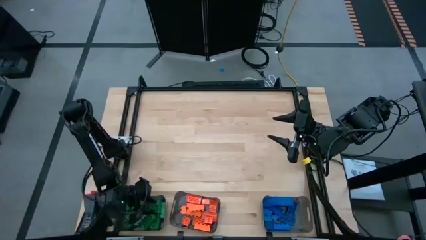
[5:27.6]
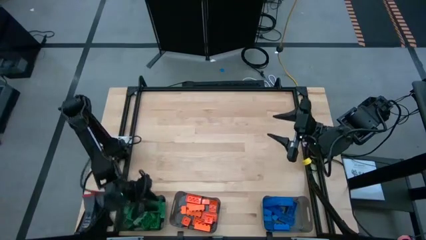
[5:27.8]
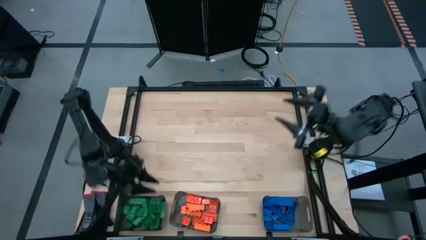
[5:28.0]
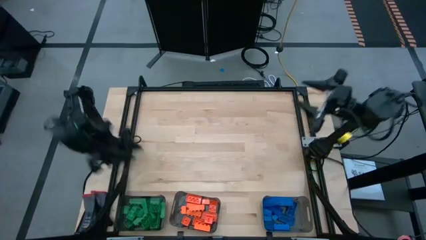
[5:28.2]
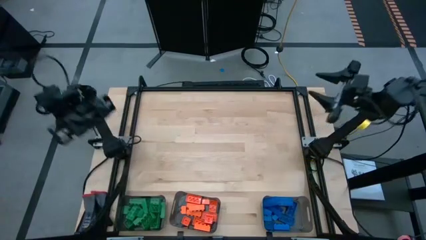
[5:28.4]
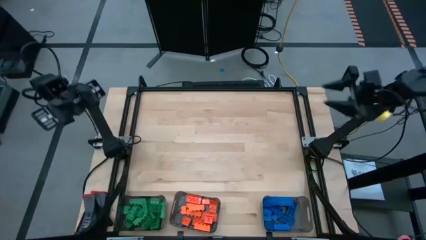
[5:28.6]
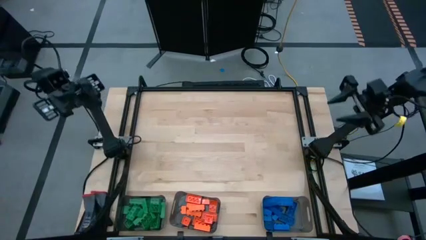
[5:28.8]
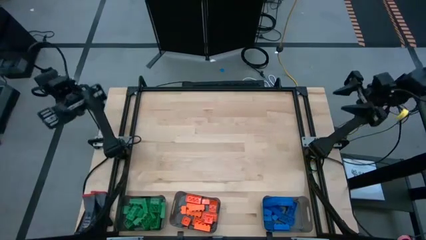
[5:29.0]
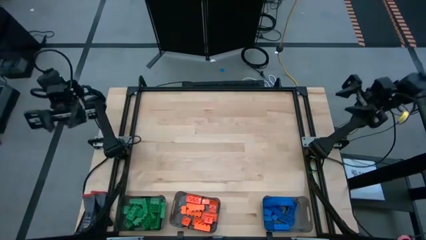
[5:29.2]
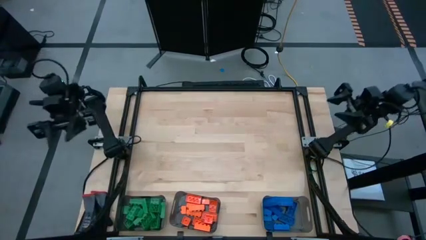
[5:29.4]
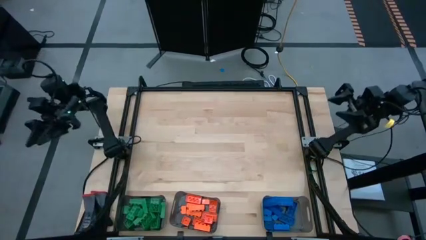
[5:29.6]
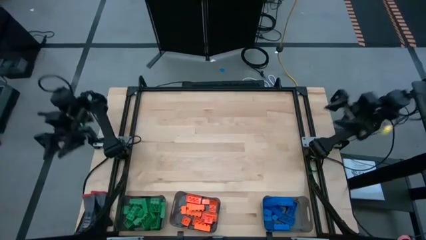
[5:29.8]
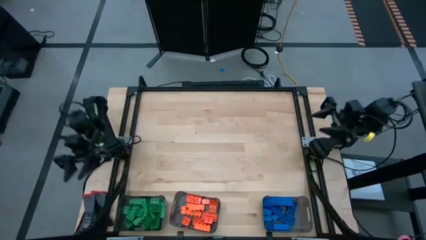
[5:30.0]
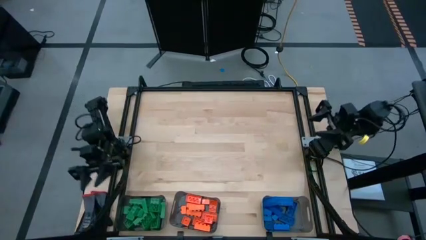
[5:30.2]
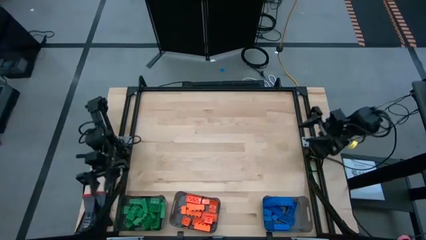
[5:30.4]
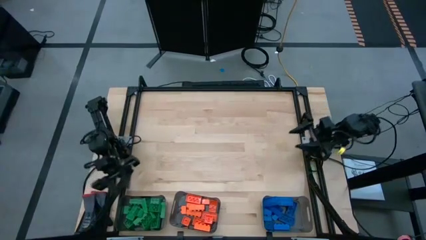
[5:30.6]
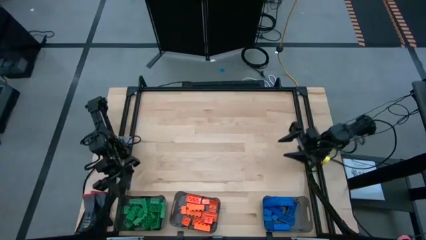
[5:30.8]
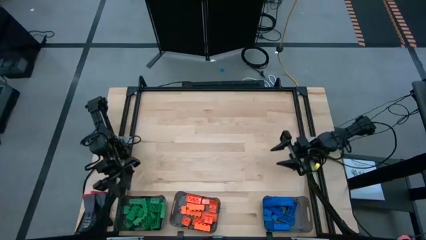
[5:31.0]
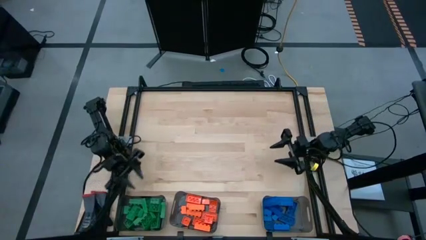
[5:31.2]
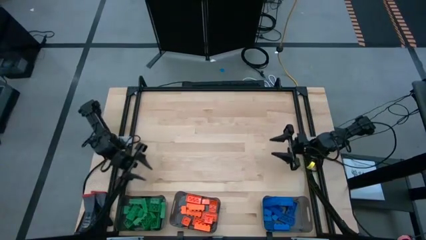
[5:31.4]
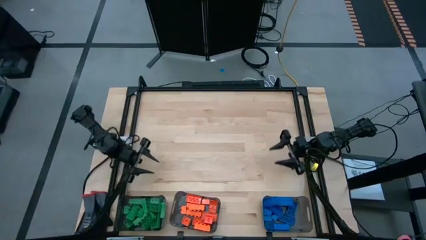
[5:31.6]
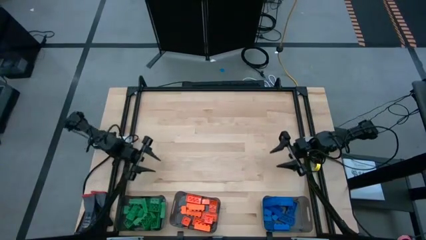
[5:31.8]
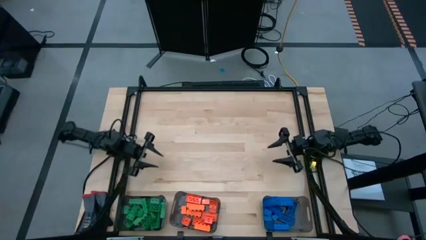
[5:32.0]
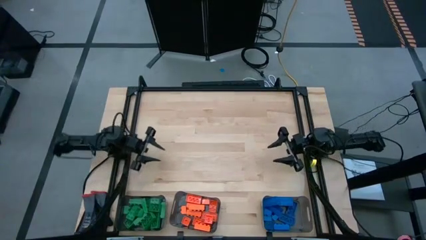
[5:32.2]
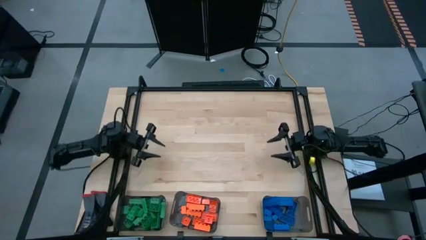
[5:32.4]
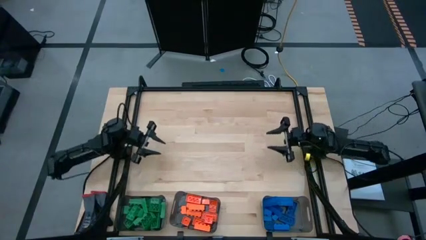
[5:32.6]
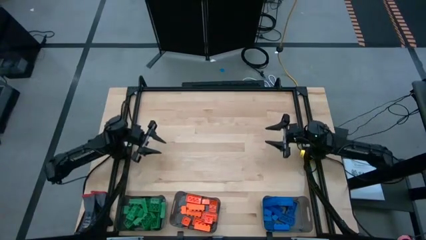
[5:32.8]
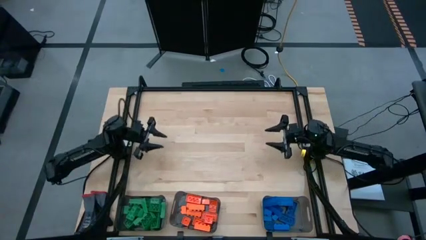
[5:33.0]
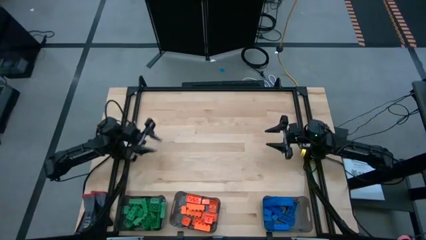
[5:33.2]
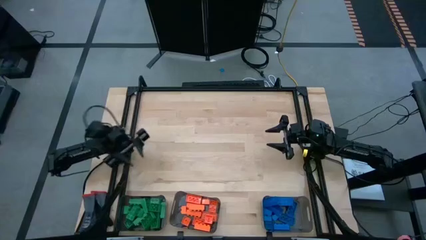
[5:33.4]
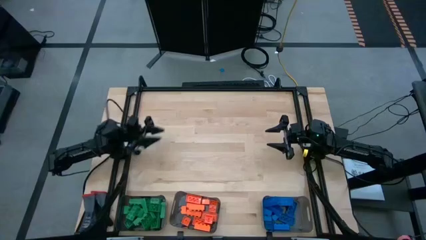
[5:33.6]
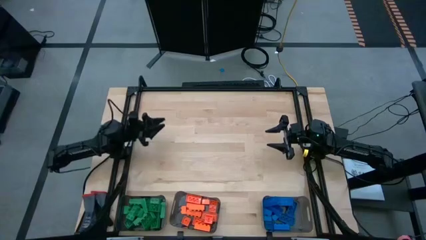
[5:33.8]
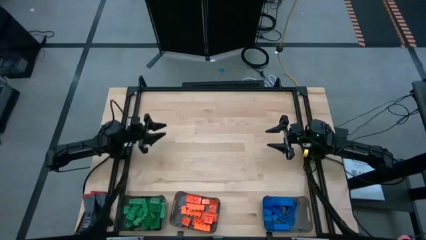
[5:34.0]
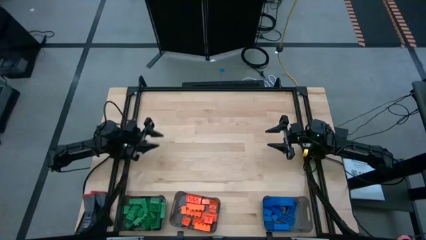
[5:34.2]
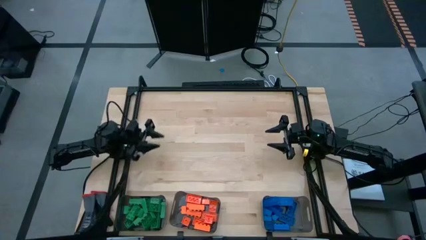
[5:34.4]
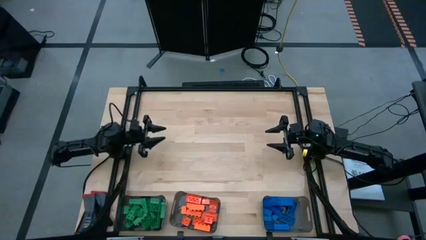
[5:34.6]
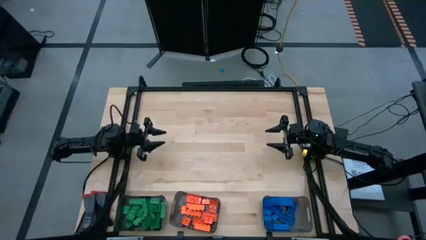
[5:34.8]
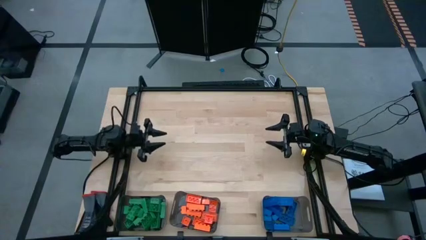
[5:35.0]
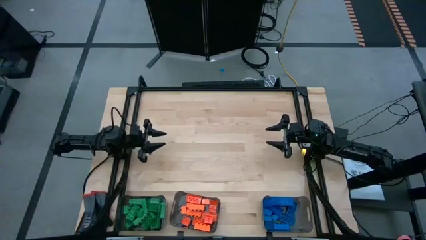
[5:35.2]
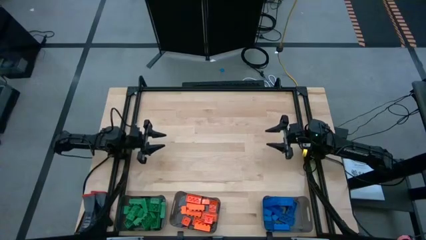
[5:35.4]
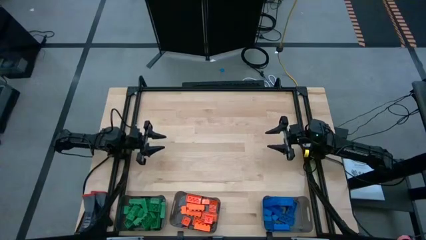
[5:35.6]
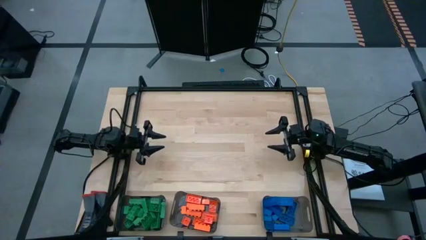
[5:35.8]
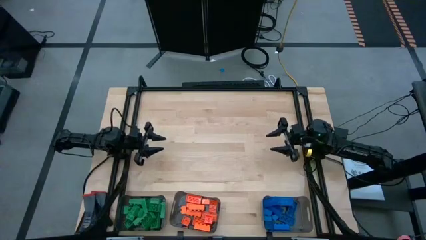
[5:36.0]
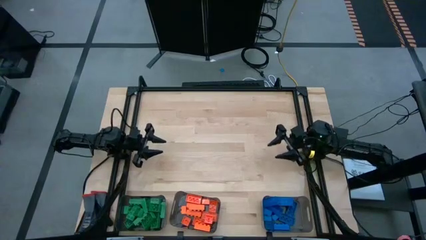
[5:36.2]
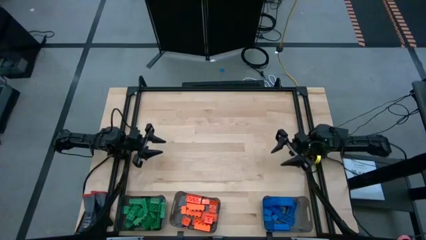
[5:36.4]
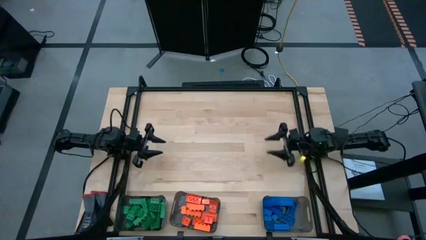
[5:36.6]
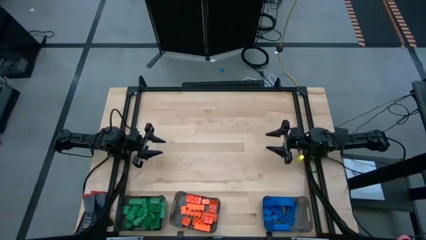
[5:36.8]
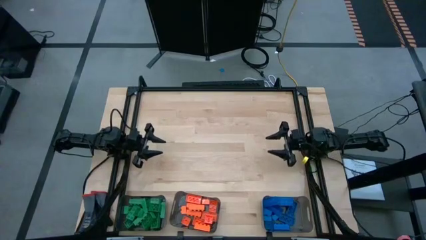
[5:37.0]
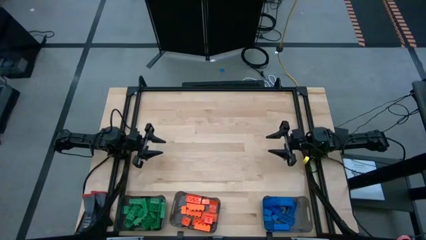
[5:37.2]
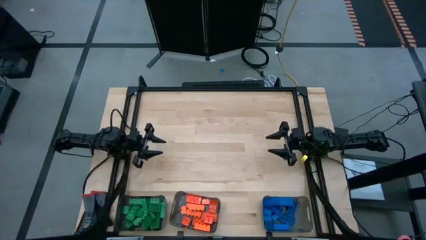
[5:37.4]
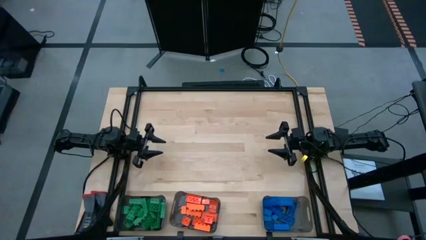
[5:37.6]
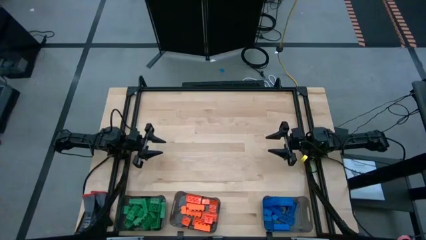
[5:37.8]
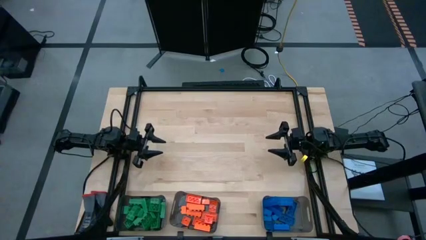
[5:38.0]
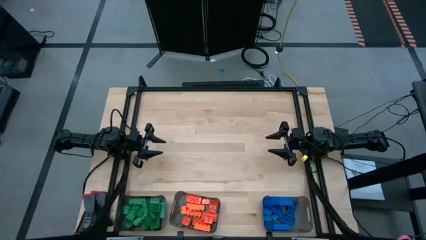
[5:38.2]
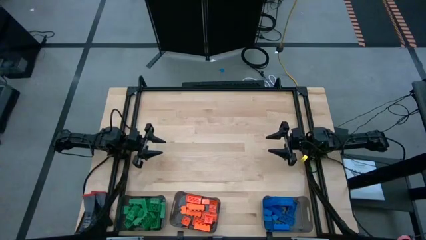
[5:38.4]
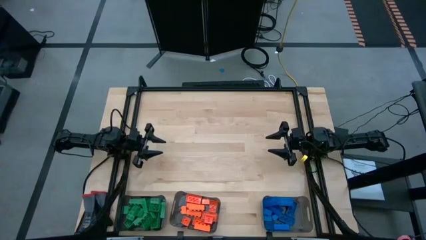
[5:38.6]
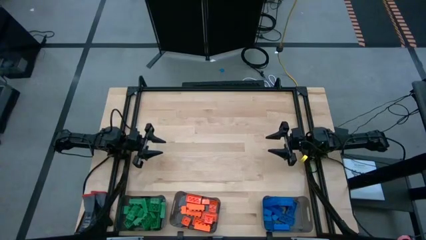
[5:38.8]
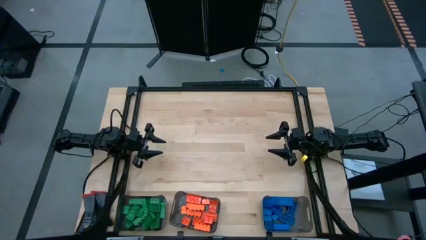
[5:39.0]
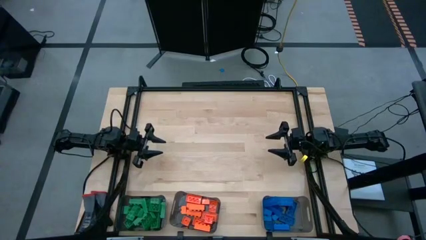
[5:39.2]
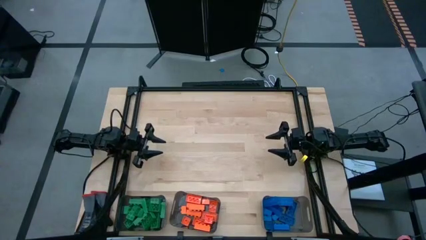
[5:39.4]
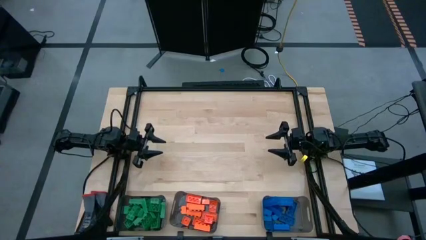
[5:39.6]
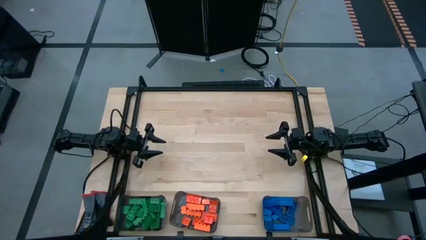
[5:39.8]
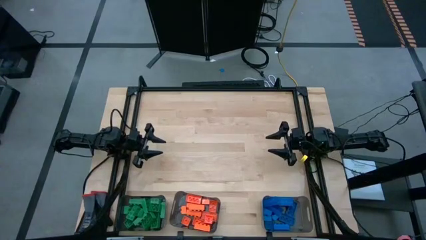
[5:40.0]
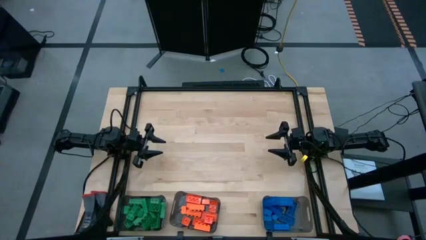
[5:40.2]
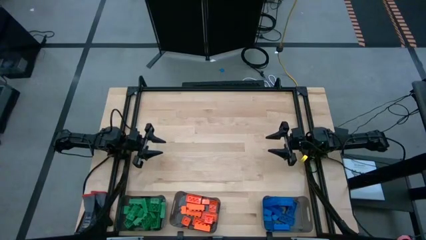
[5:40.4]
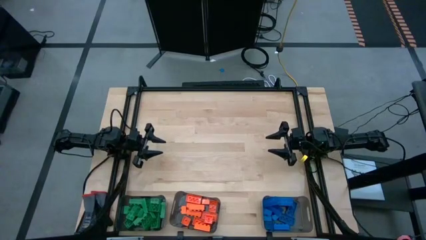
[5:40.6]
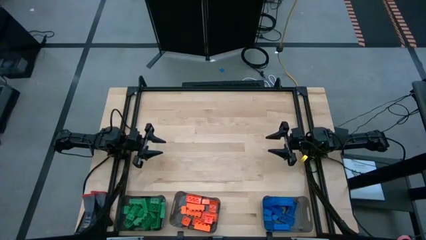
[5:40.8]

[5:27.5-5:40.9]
Task: Sort blocks
Return to Home Position
